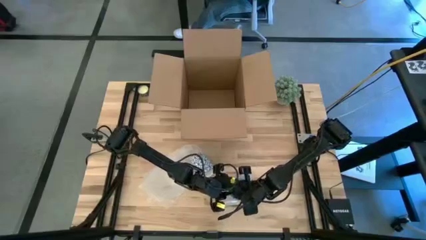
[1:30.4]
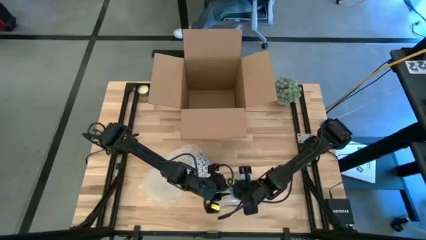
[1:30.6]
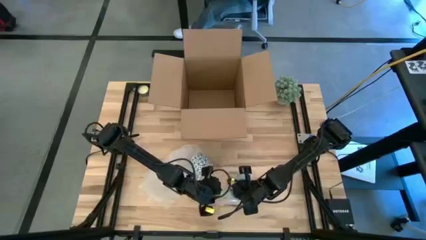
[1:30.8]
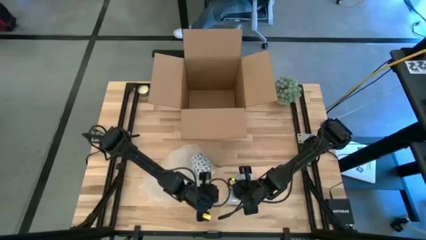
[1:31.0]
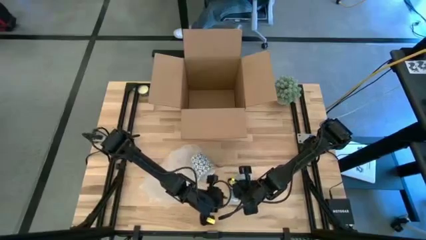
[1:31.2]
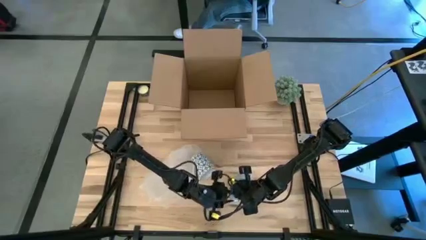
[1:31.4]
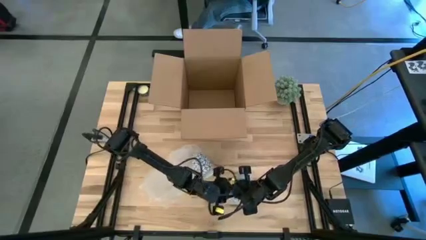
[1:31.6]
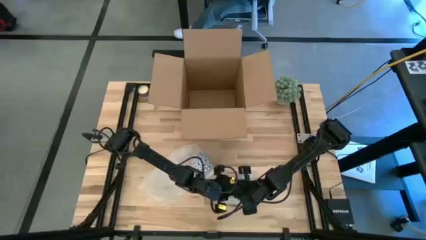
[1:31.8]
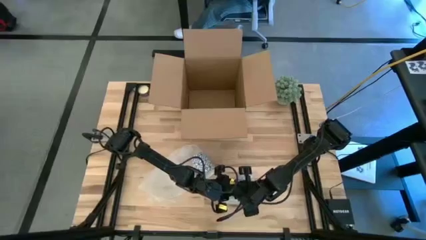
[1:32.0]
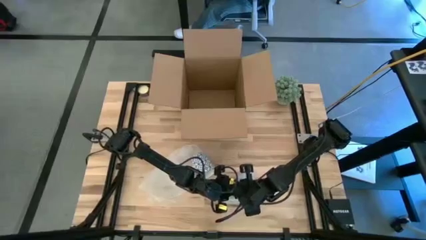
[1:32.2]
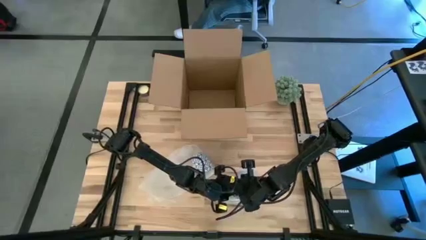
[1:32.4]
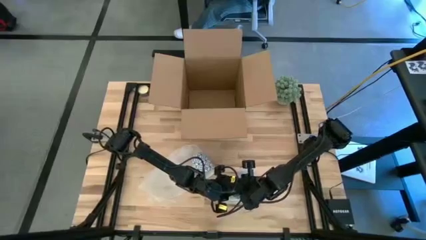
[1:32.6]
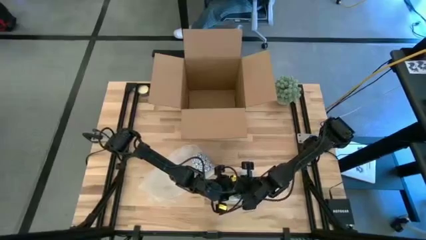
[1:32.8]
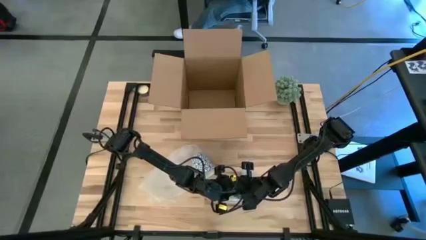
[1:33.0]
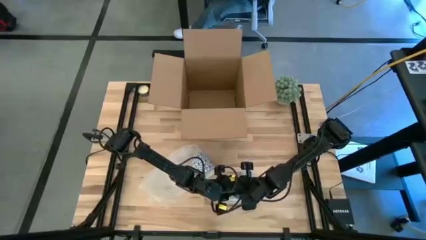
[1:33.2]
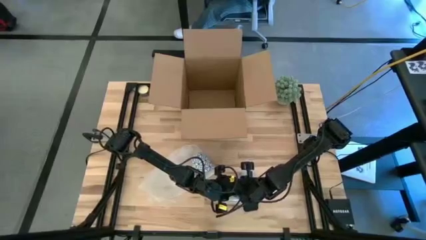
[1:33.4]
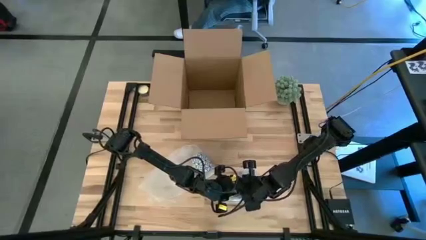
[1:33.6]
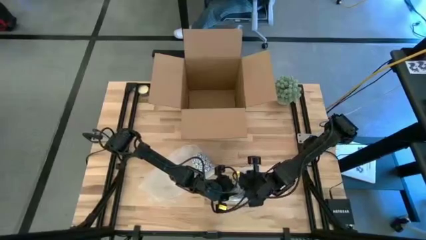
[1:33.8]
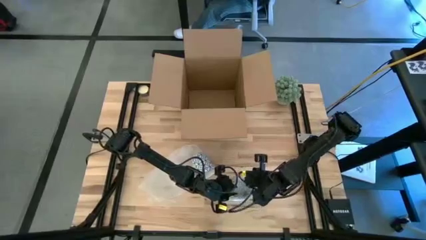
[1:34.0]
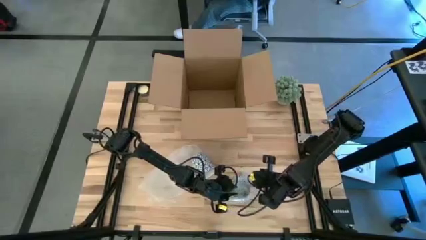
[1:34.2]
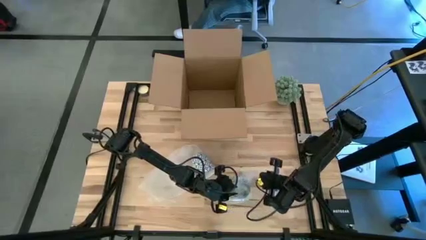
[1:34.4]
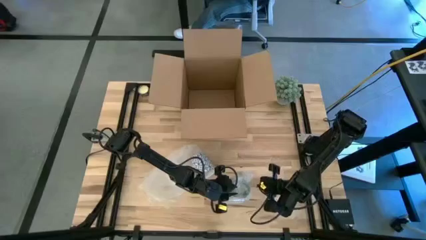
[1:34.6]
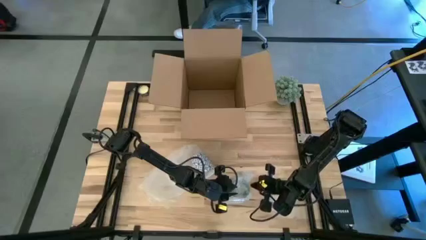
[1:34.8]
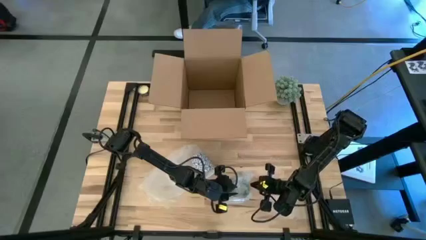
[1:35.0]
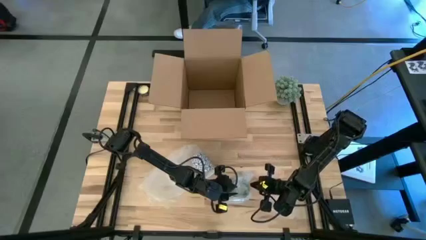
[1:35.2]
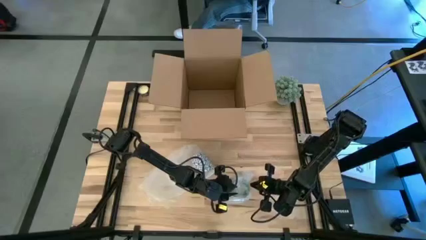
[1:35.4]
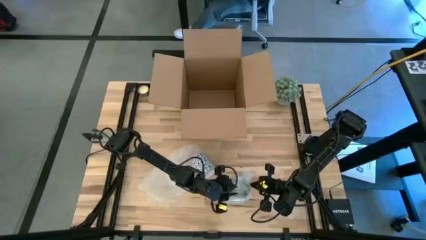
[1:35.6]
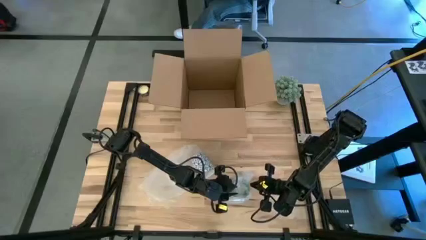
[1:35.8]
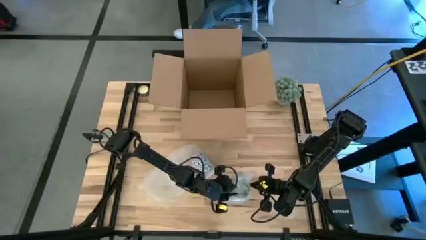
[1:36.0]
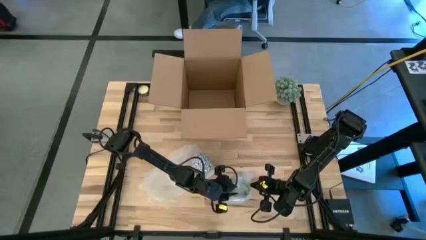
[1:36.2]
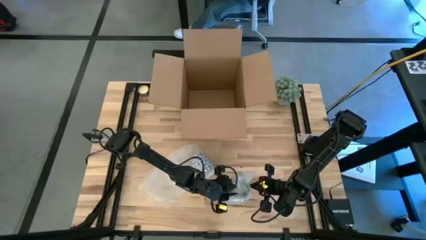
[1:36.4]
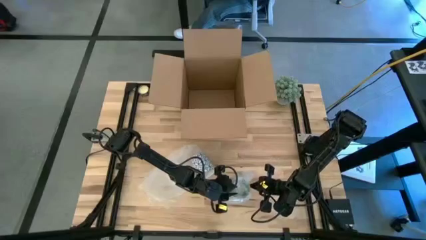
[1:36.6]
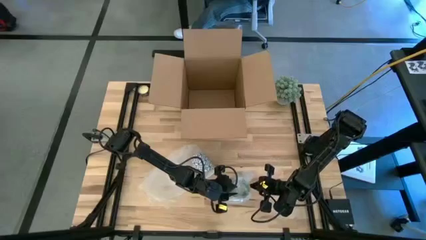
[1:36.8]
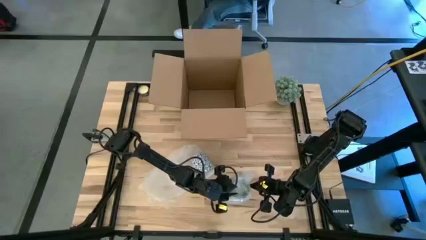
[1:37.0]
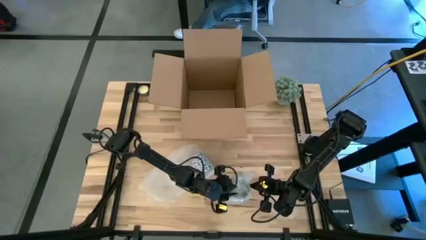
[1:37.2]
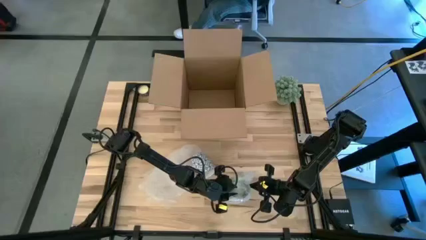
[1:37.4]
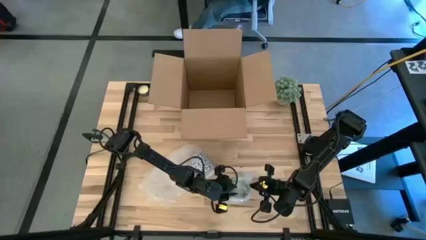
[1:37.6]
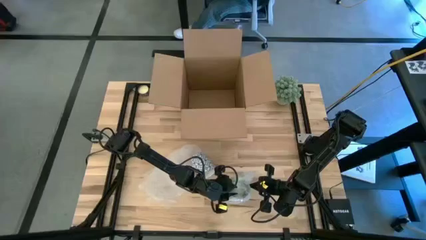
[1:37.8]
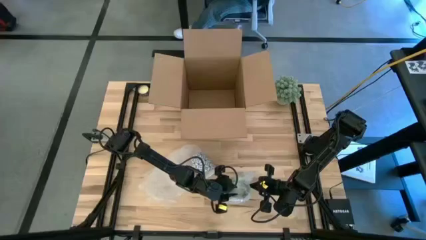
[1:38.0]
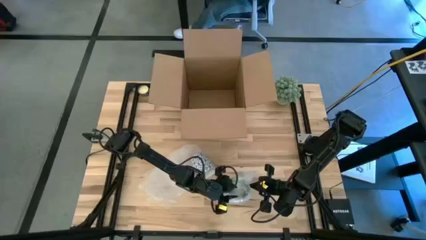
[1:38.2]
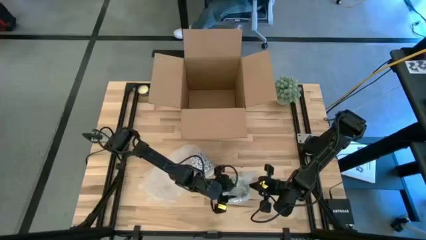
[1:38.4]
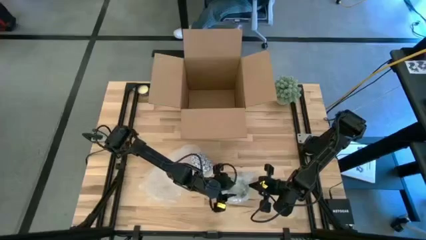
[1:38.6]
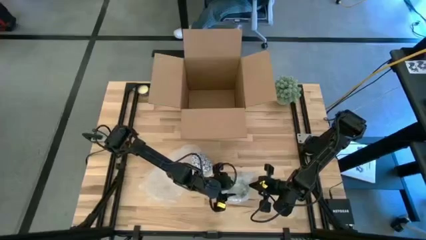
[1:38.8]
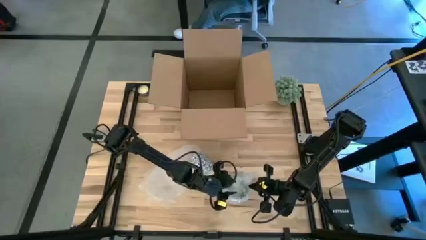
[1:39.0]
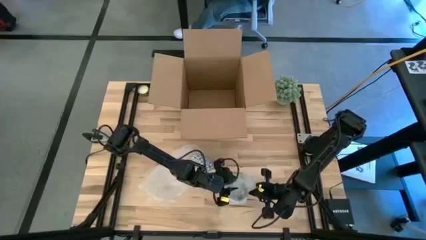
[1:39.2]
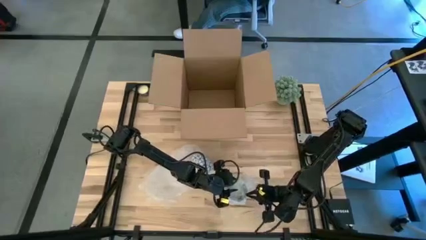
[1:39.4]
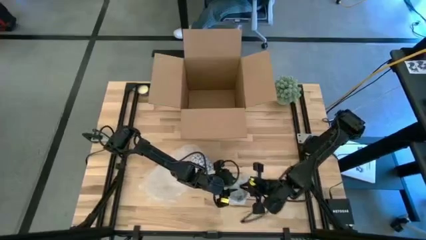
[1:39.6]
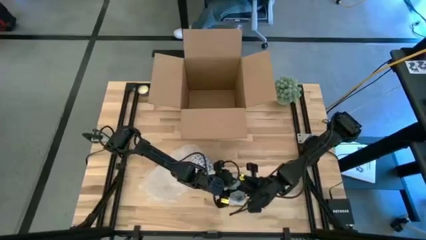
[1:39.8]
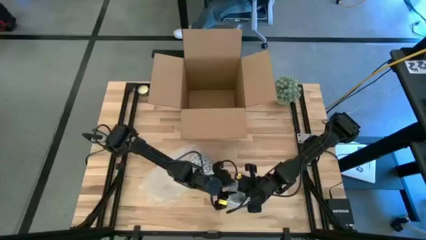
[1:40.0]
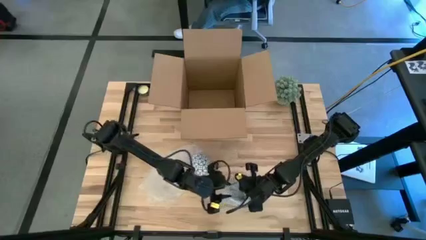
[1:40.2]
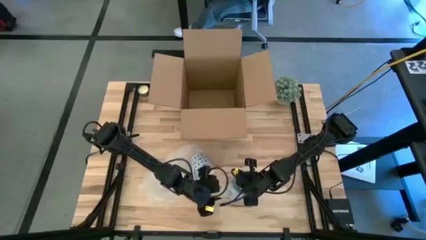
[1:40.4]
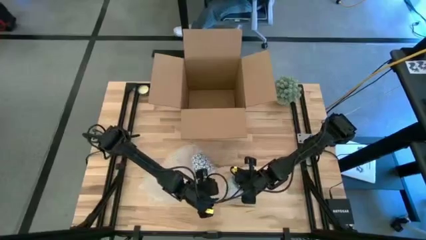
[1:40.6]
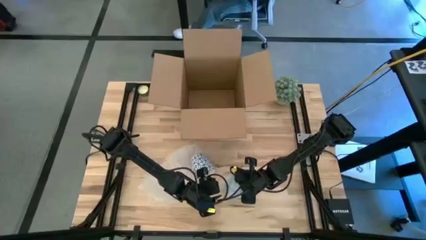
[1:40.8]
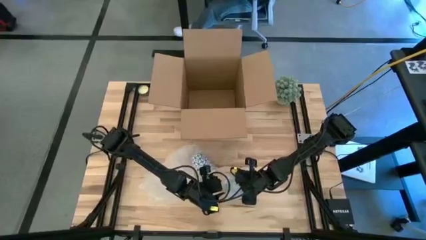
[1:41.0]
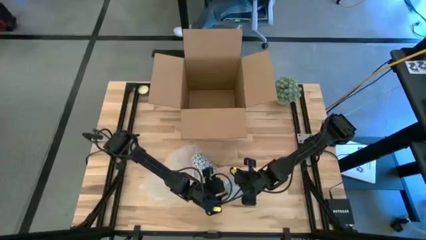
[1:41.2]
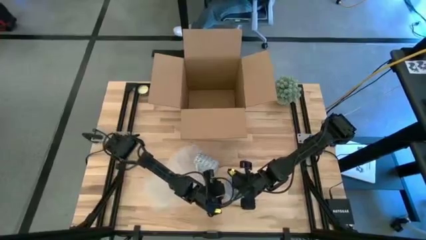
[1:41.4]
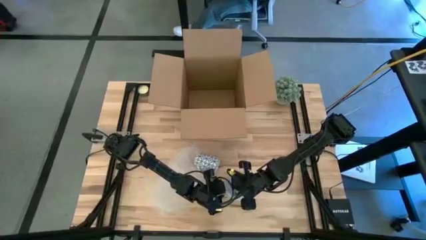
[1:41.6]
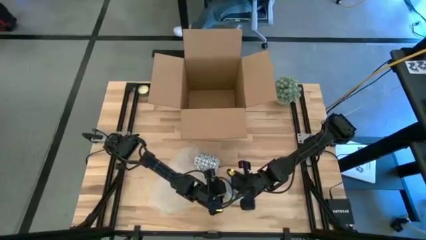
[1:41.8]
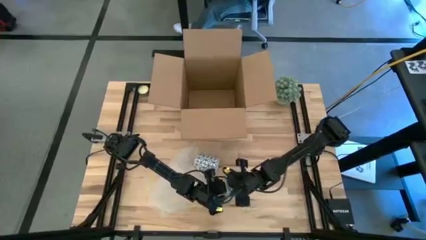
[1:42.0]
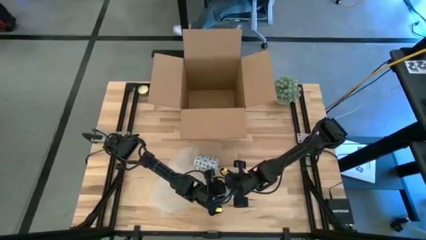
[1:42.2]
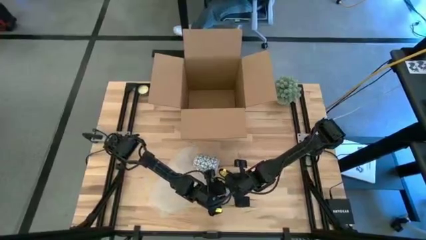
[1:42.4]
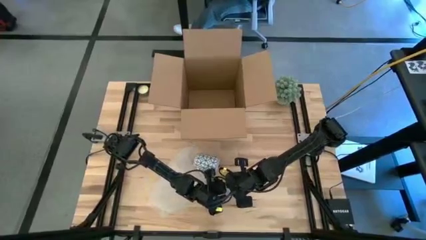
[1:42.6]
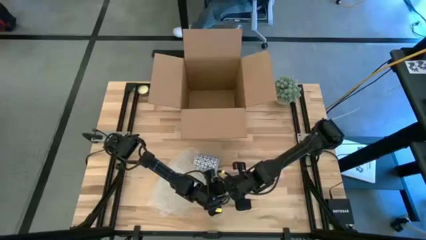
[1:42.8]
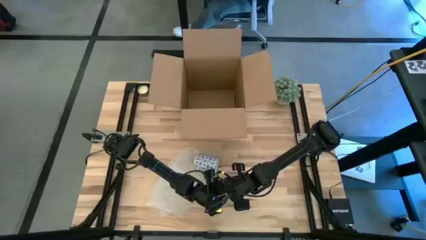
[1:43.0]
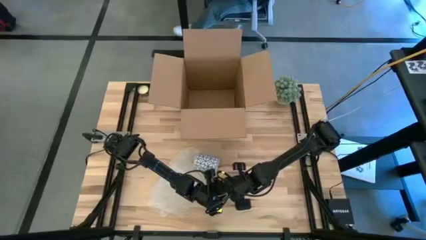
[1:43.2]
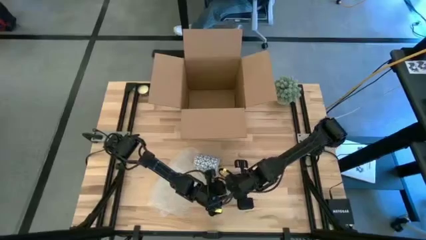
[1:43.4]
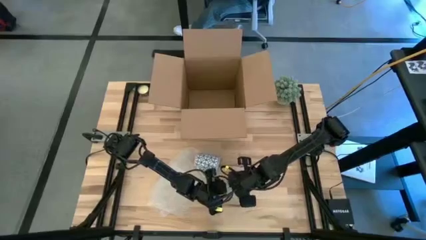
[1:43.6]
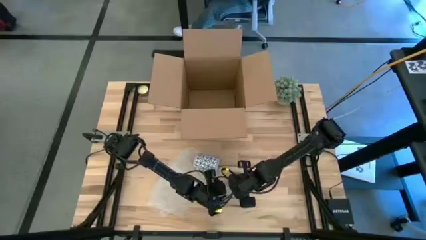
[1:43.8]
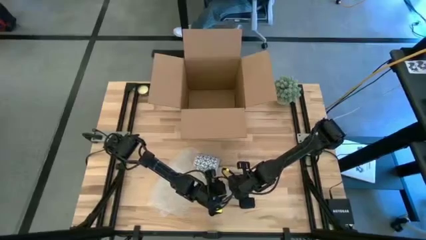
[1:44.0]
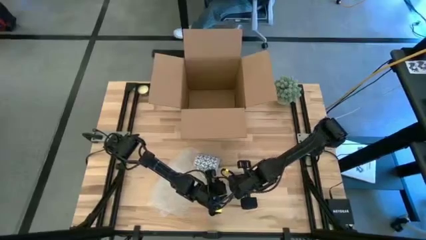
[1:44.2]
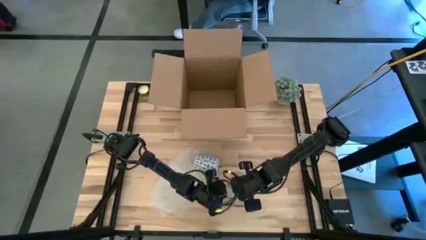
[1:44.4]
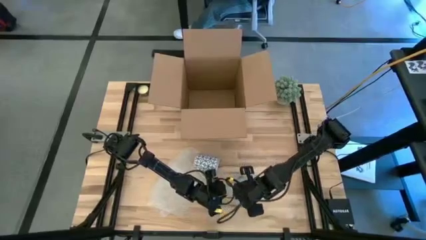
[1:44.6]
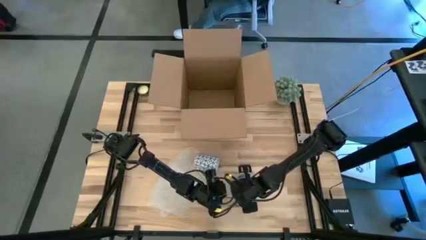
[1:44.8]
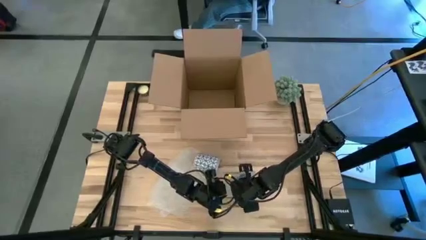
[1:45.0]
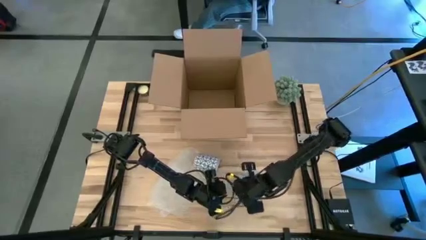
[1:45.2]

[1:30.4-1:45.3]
Task: wrap mug
Wrap the green mug with the right transparent bubble wrap

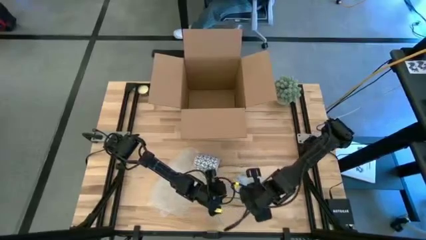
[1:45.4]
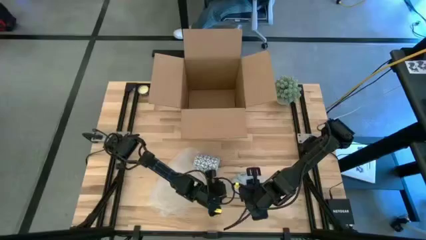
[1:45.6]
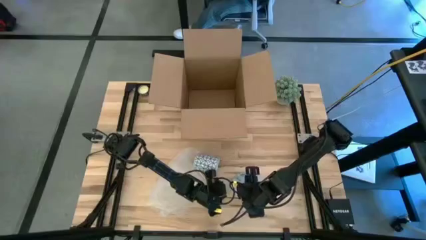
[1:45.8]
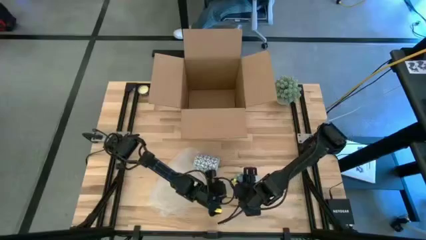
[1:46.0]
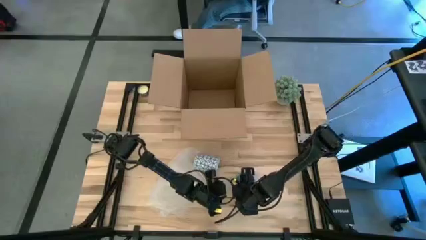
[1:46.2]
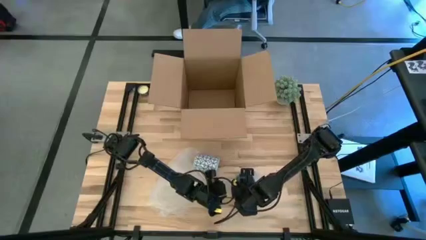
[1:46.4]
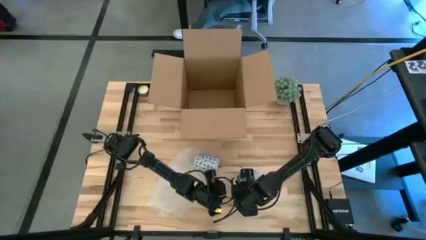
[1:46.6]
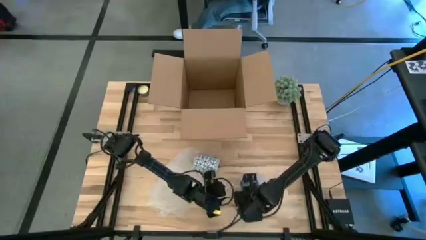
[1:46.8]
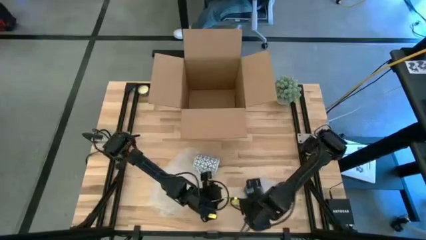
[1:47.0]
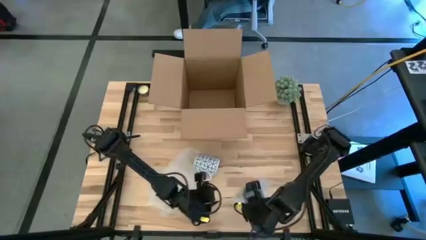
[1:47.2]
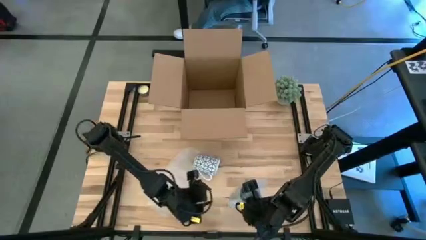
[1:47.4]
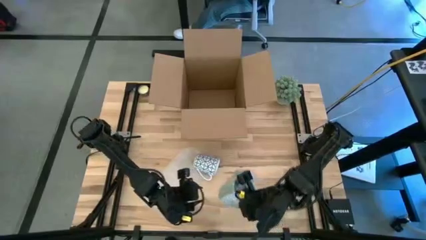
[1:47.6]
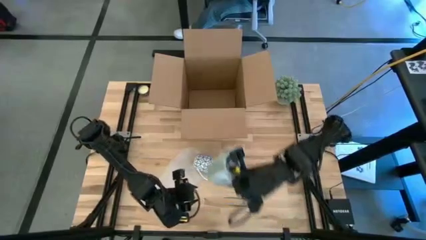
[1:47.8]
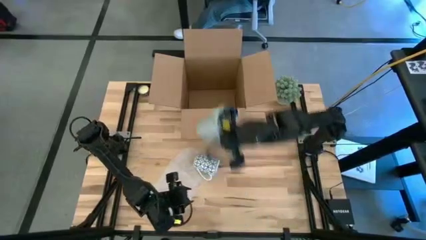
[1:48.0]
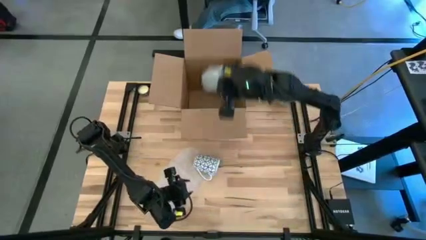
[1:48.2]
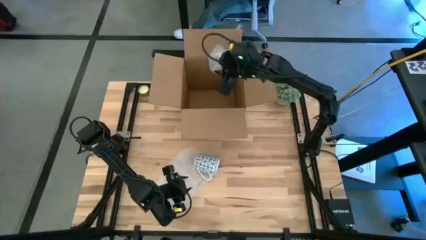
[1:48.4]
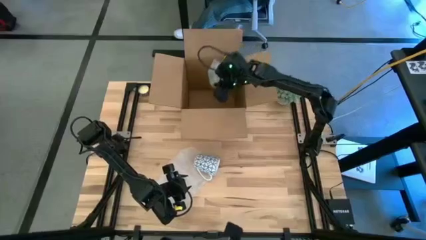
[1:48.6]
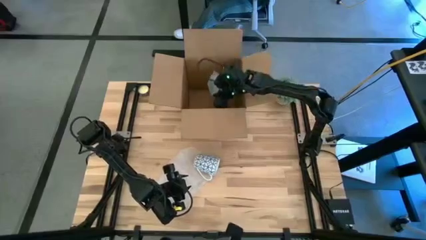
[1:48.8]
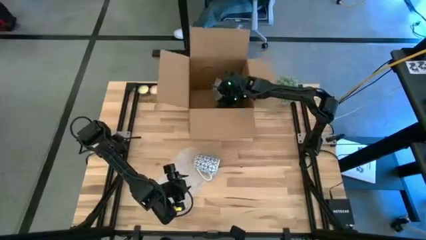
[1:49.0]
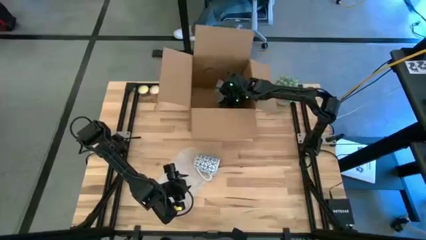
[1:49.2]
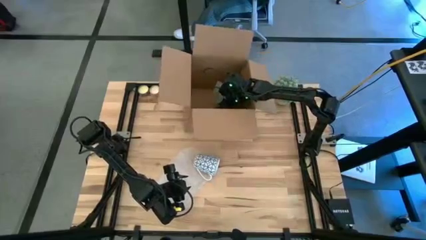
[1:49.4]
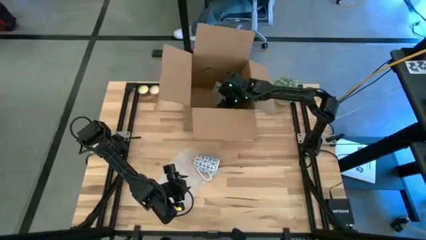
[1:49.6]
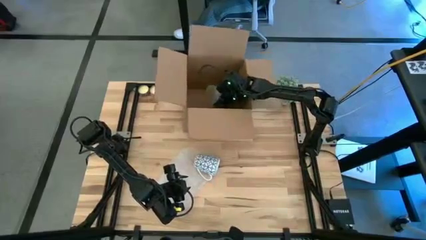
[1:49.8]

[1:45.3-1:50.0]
Put the wrapped green mug into the brown cardboard box
